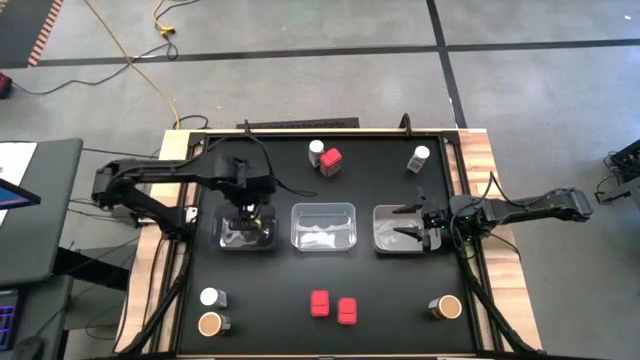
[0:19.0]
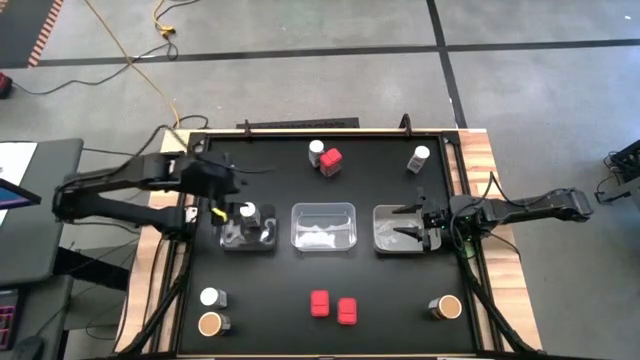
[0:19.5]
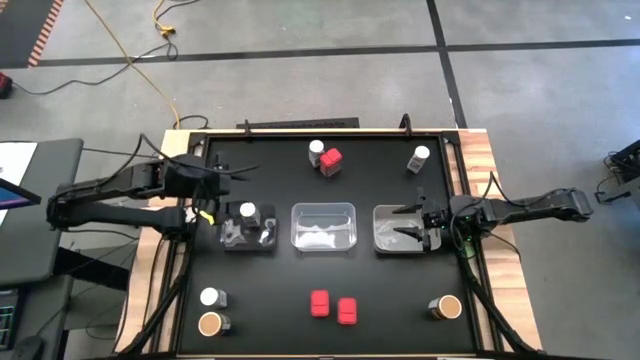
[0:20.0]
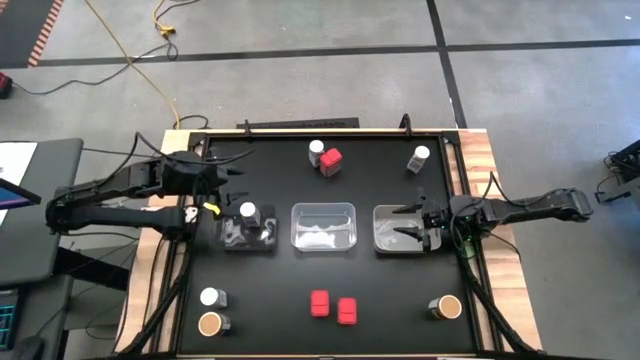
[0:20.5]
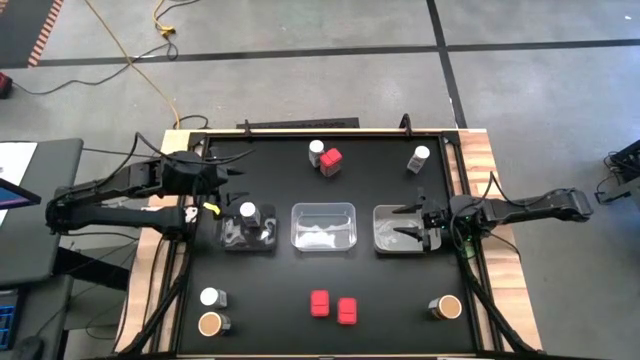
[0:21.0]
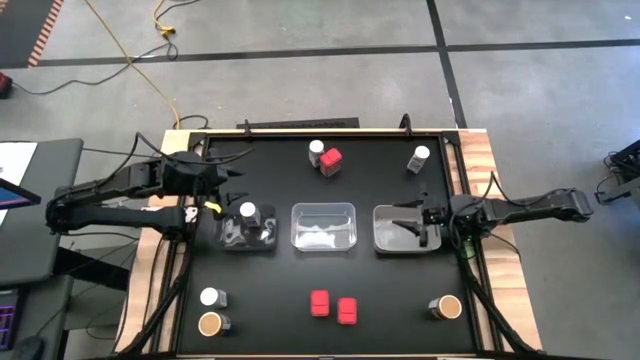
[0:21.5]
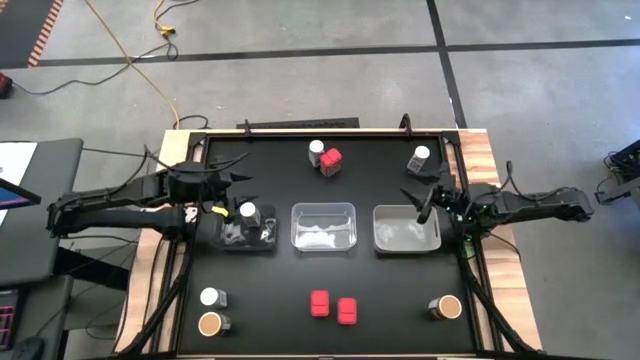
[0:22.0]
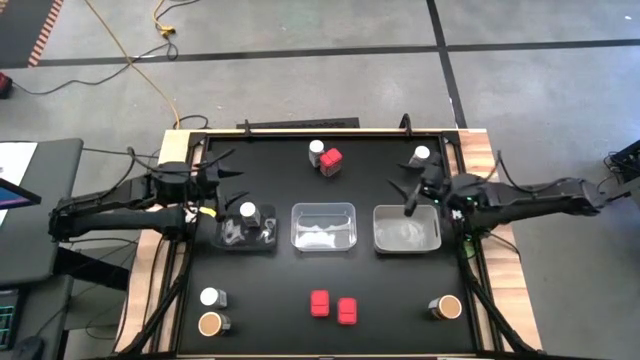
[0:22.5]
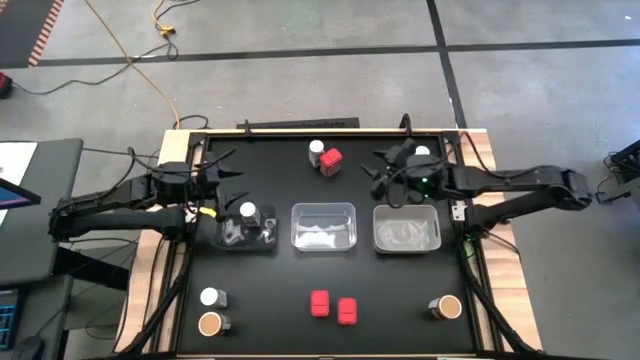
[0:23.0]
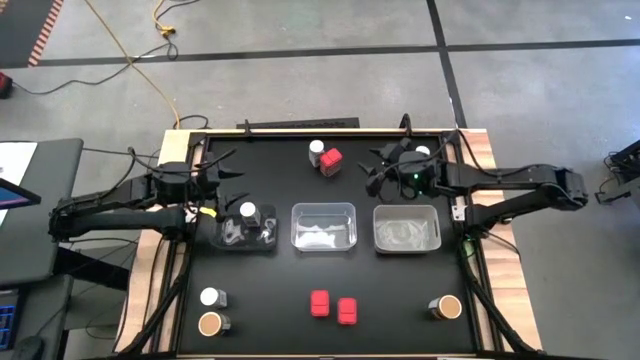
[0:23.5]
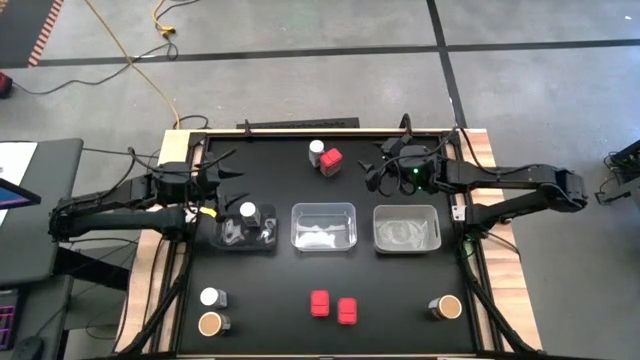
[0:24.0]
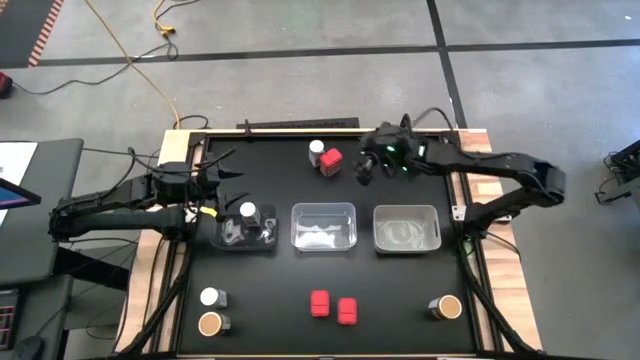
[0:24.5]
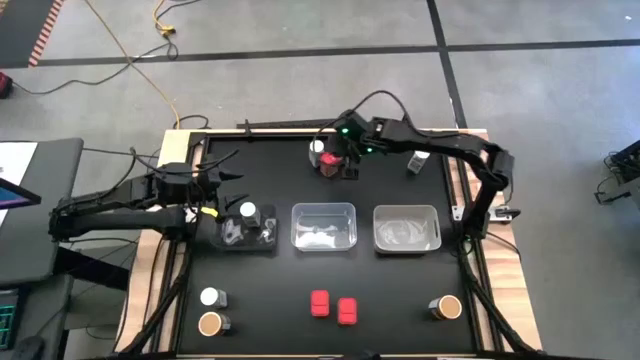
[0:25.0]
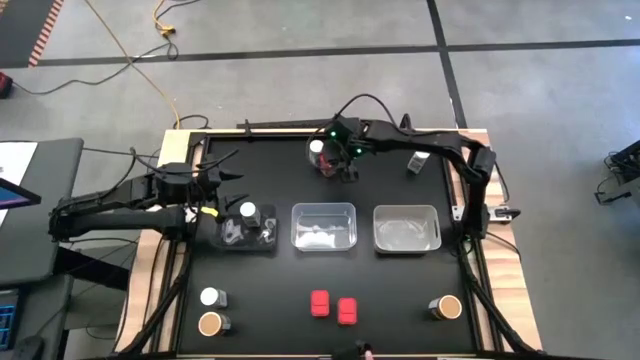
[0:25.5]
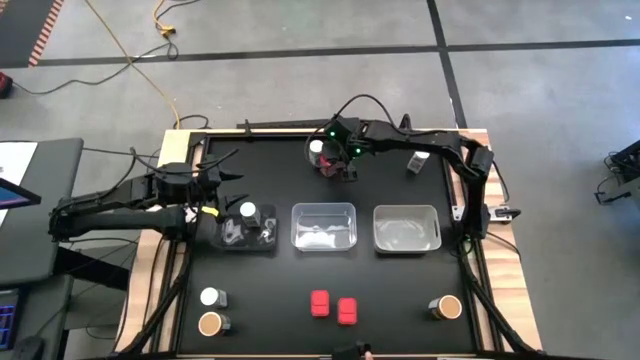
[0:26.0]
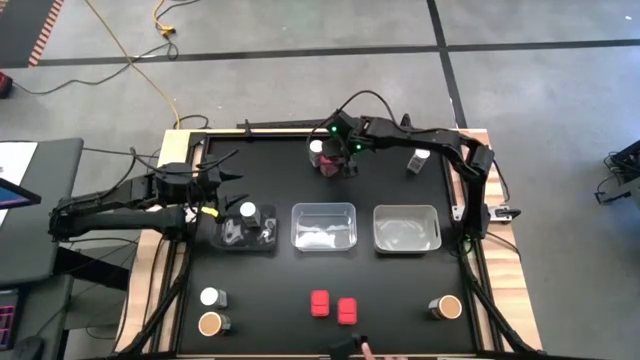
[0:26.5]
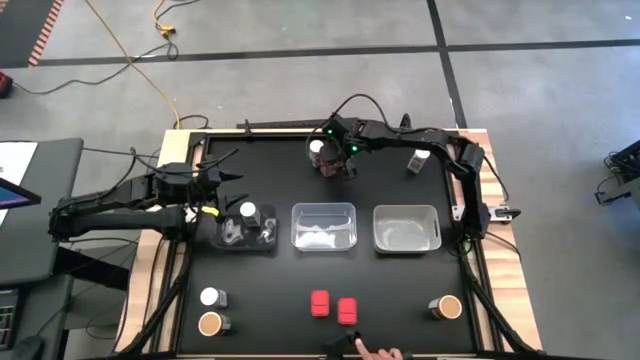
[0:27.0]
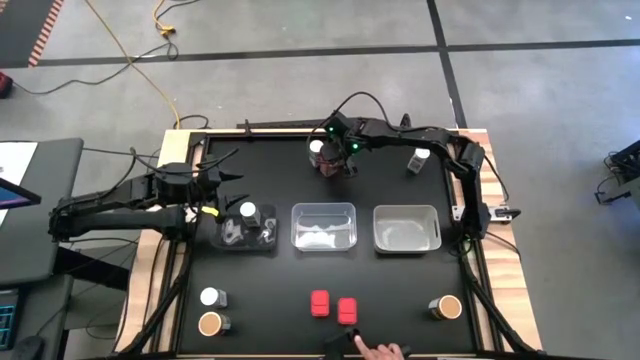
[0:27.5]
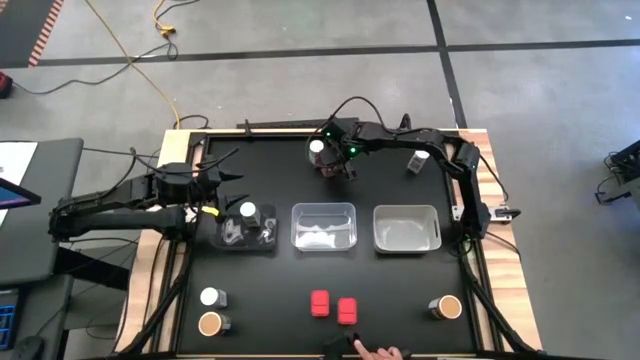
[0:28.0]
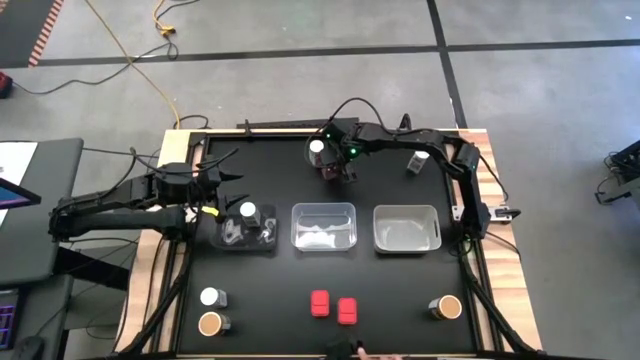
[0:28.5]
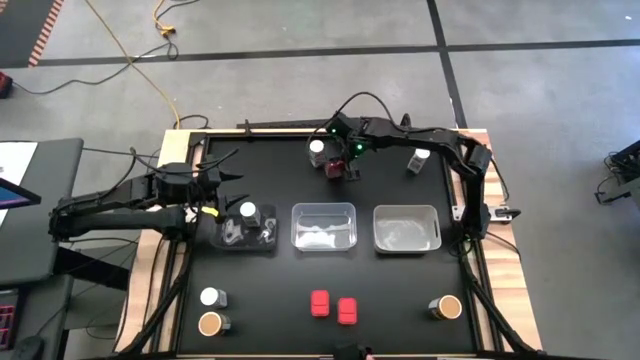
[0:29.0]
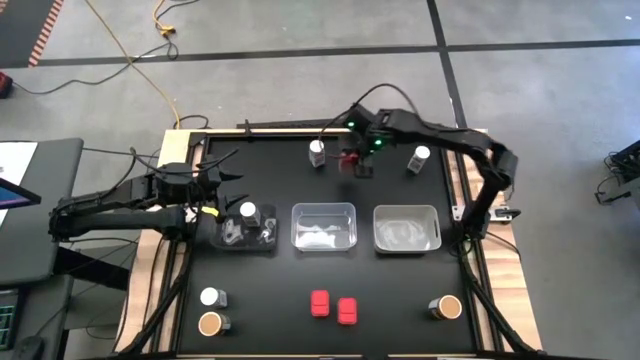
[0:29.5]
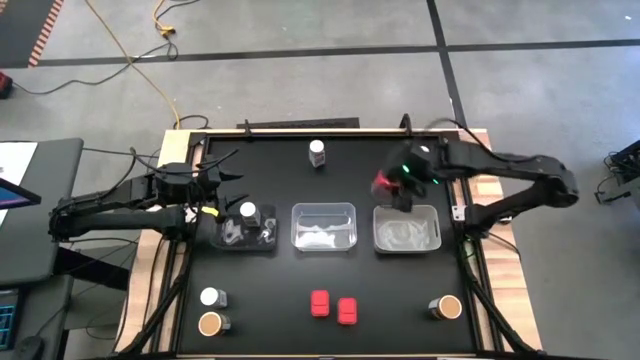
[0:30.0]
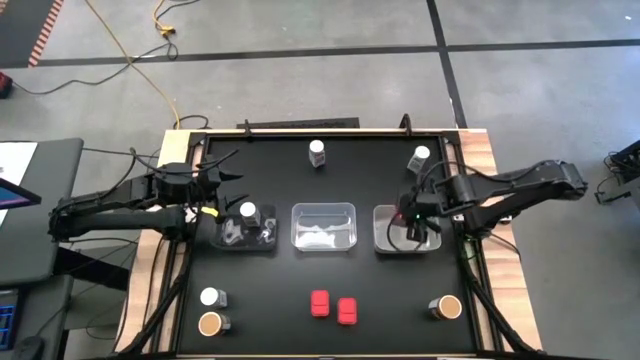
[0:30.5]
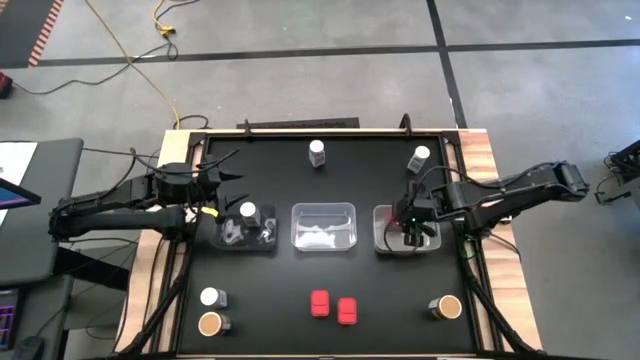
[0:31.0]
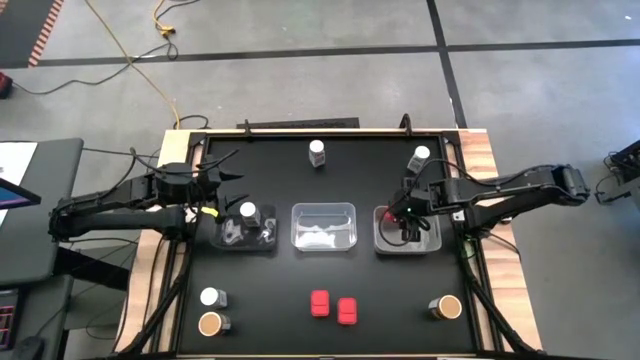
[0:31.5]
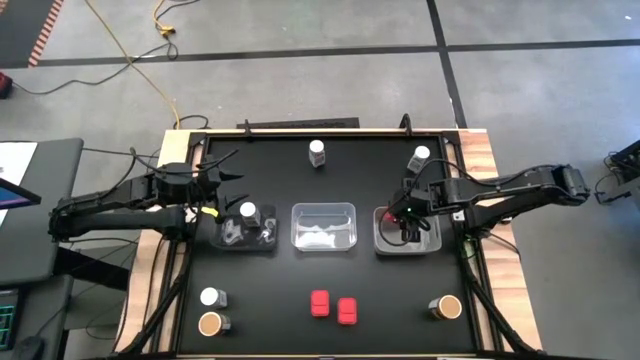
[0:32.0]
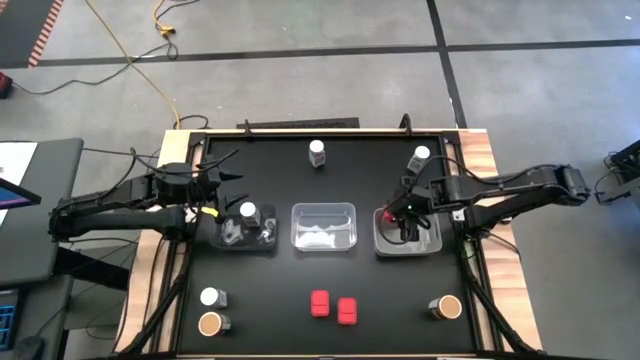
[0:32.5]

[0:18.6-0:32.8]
Task: Sort spices by type
Put the top red seasoning can into the white bin

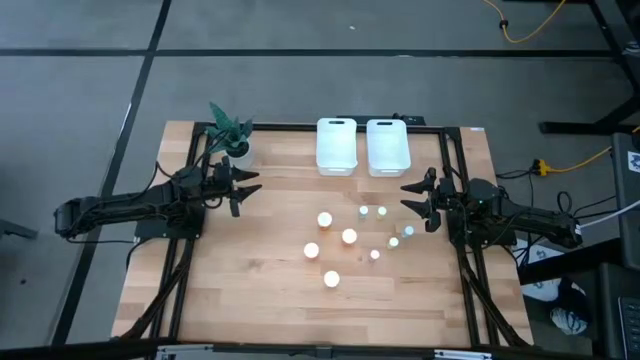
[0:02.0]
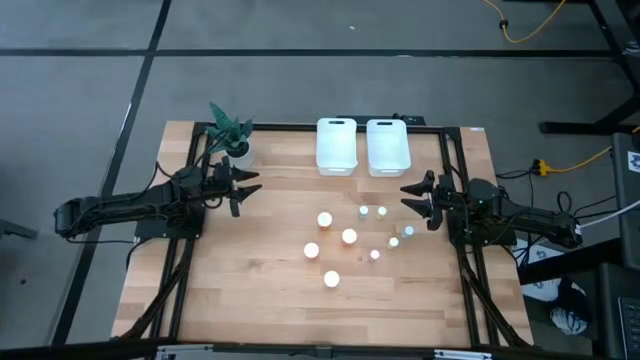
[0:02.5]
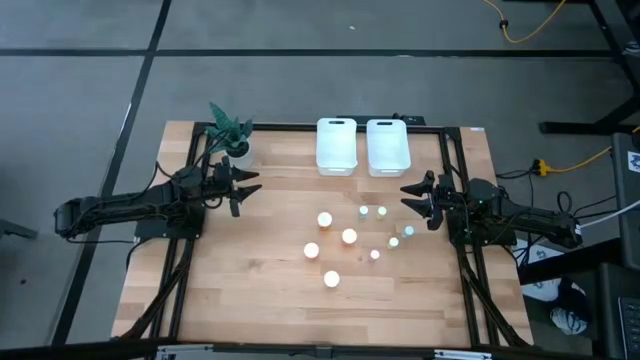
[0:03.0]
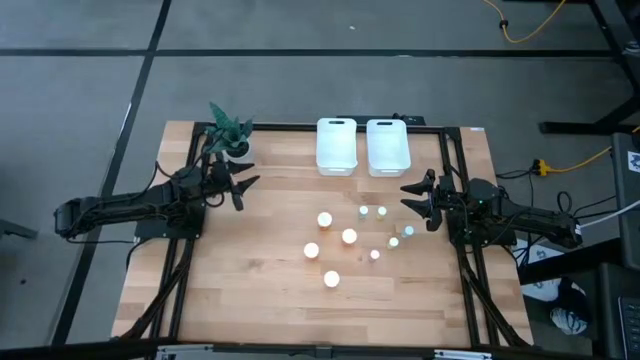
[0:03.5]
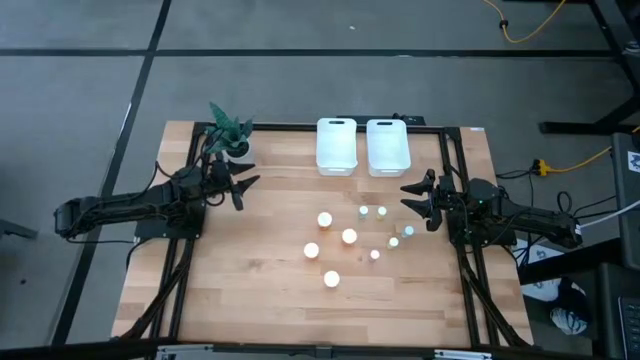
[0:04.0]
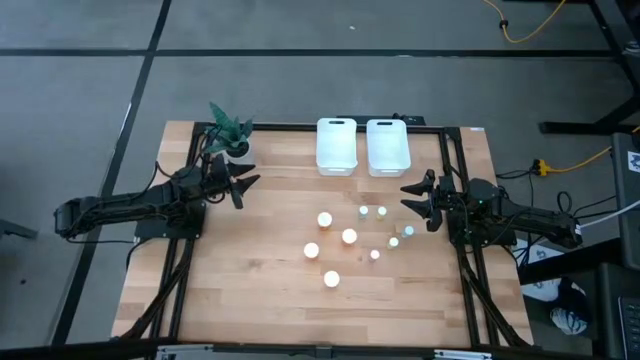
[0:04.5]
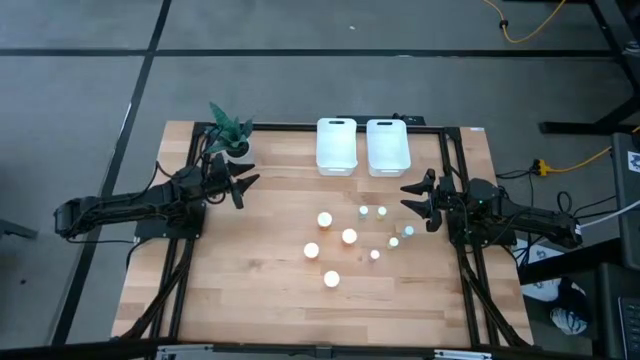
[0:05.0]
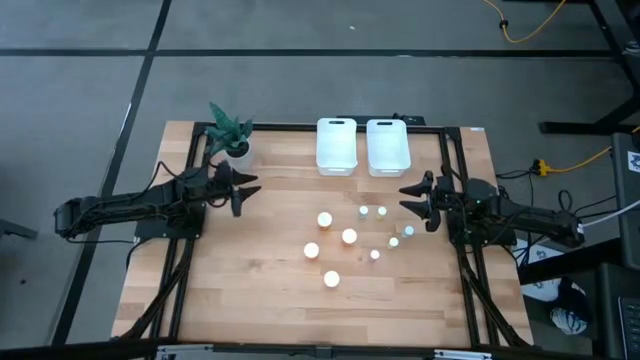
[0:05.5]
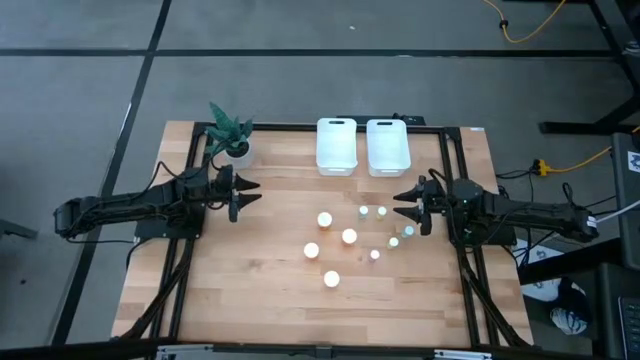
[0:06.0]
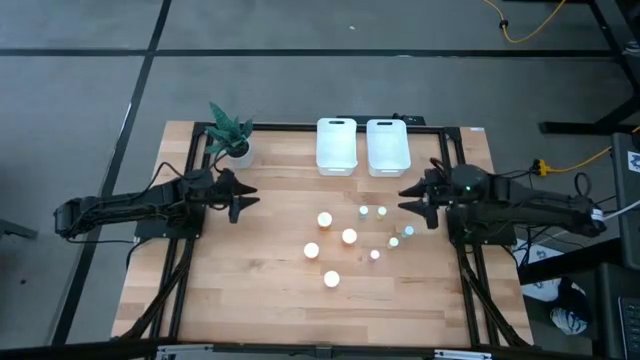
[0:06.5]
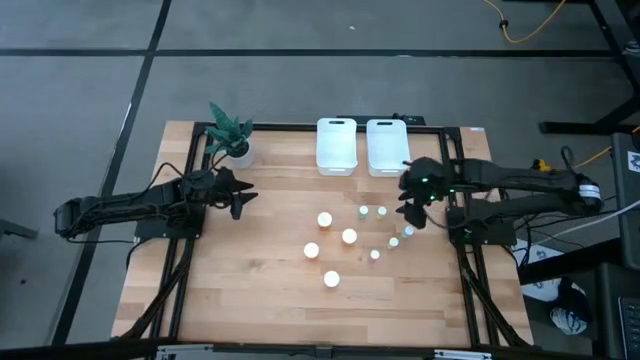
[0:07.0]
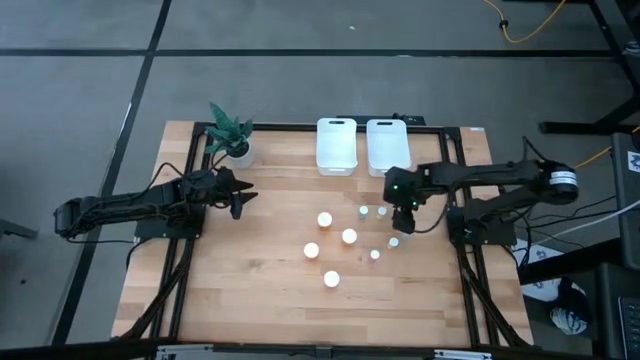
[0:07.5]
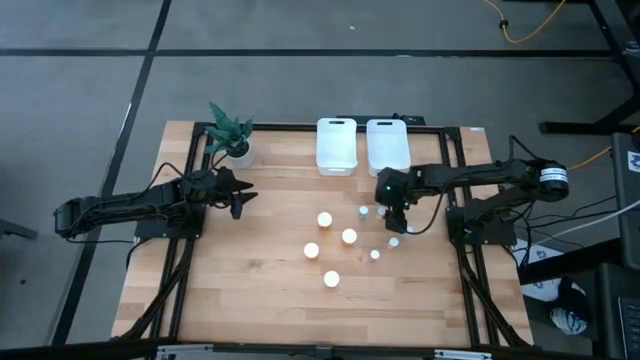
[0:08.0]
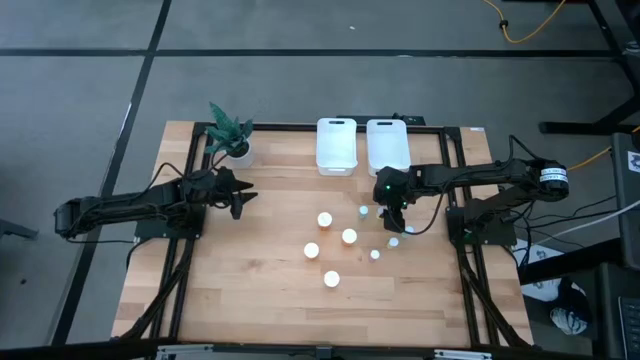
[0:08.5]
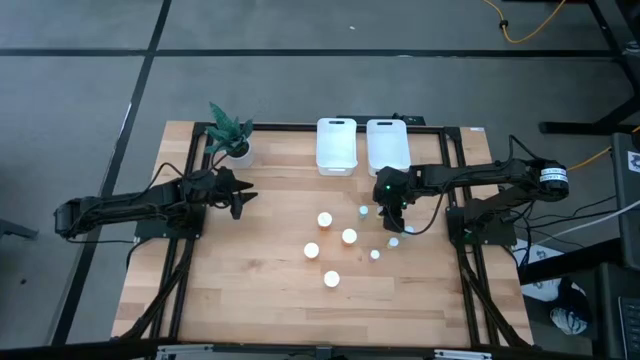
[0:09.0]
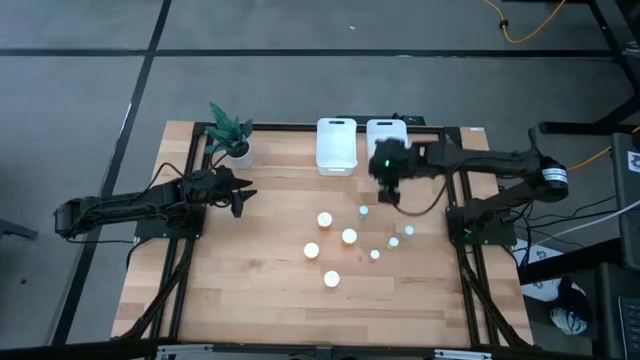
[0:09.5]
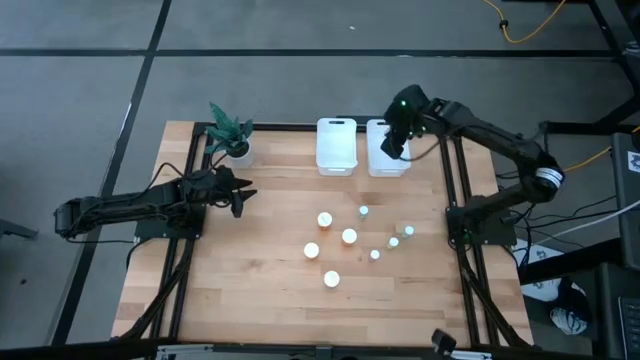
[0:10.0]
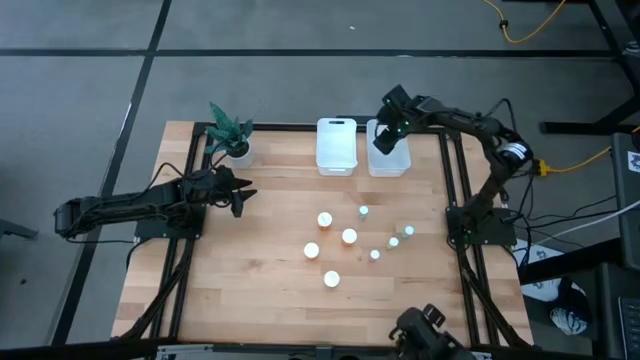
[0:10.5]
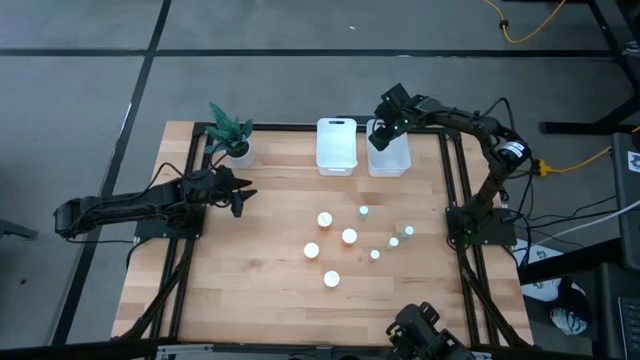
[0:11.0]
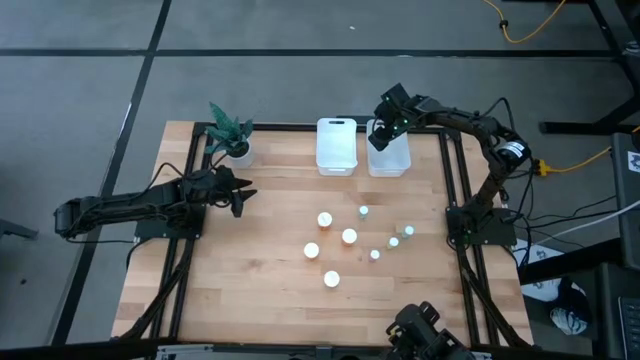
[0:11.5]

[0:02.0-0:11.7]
Task: Pick and place medicine bottles into bin by pill shape (circle, oval)
Put the small yellow pill bottle into the right white bin
